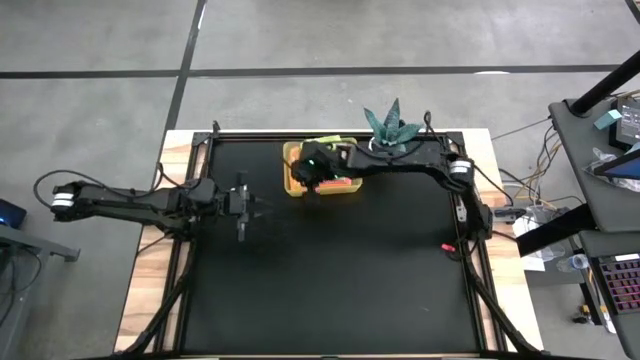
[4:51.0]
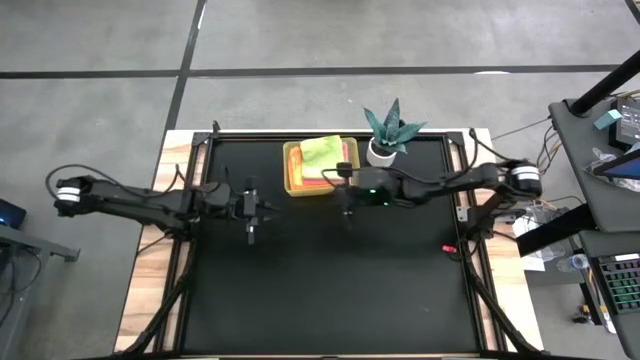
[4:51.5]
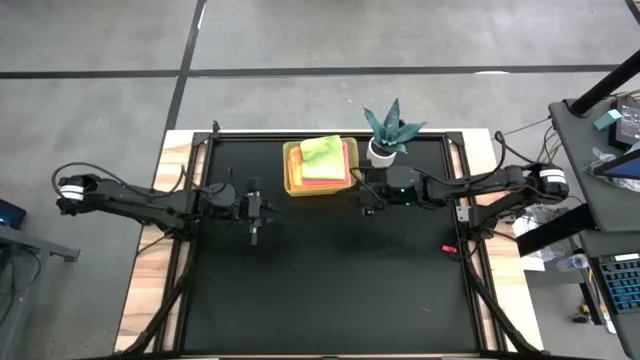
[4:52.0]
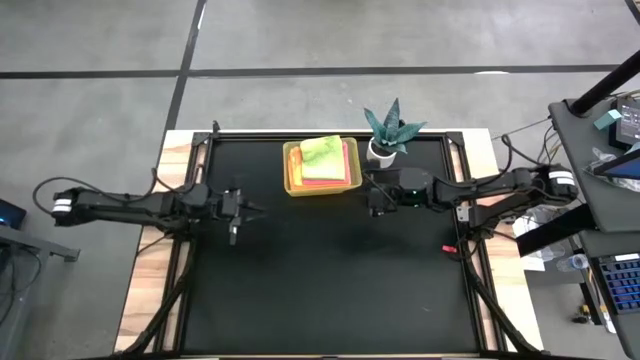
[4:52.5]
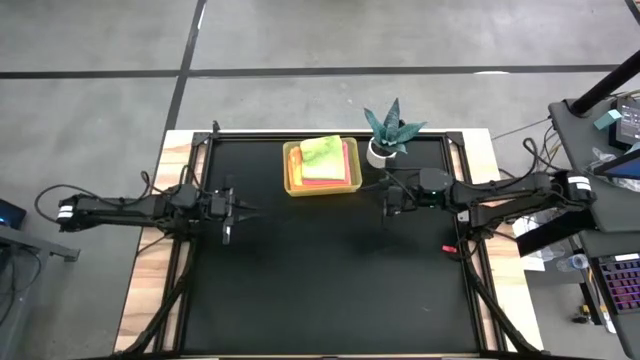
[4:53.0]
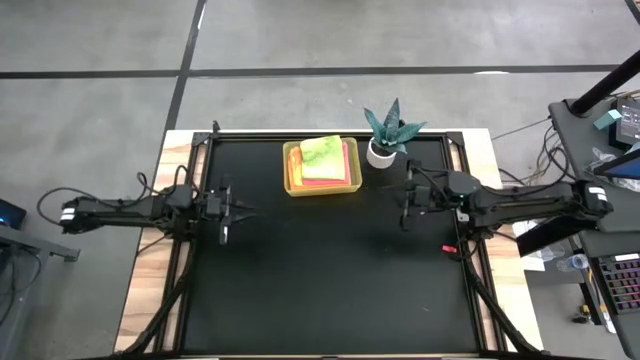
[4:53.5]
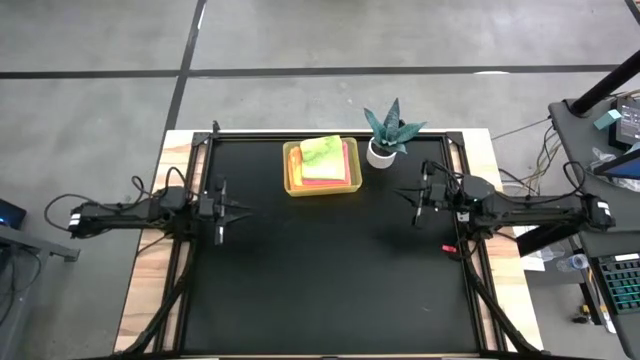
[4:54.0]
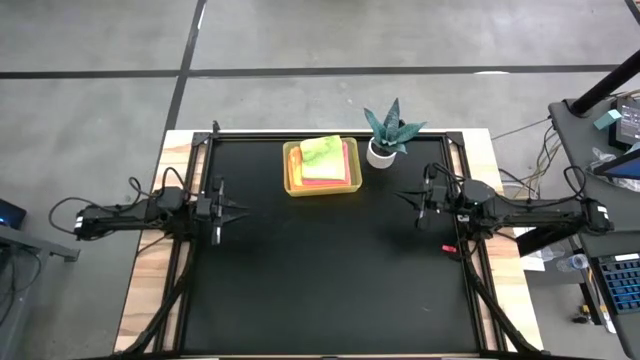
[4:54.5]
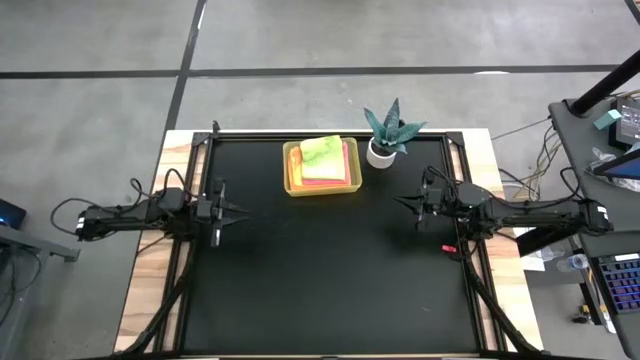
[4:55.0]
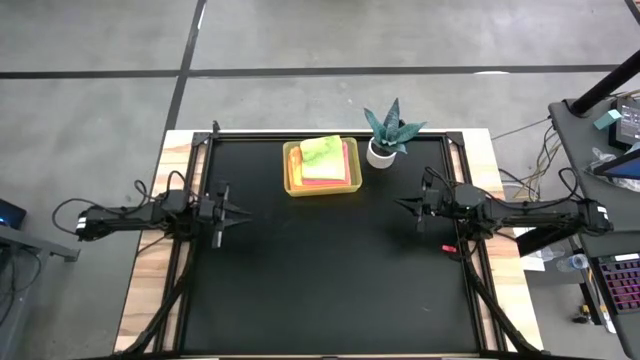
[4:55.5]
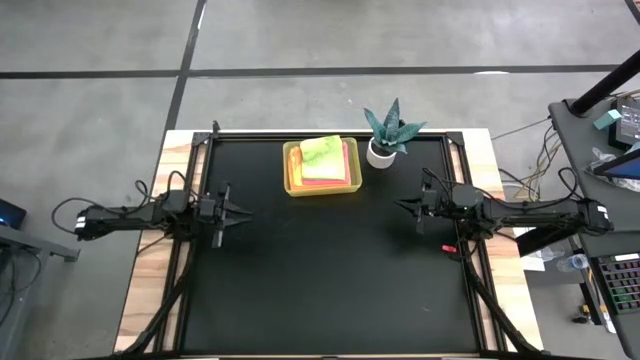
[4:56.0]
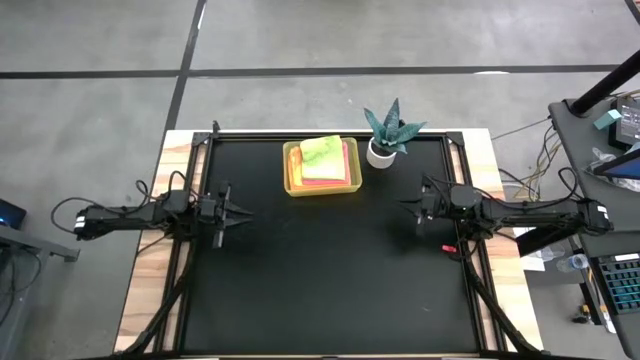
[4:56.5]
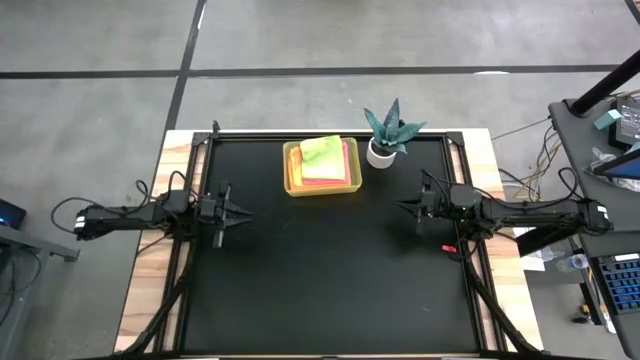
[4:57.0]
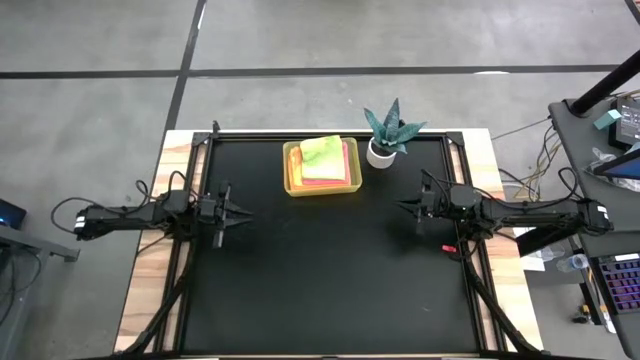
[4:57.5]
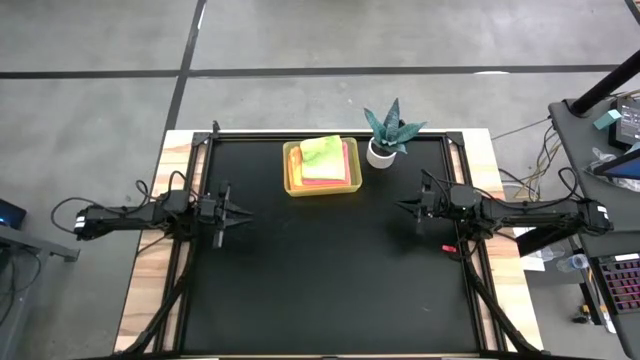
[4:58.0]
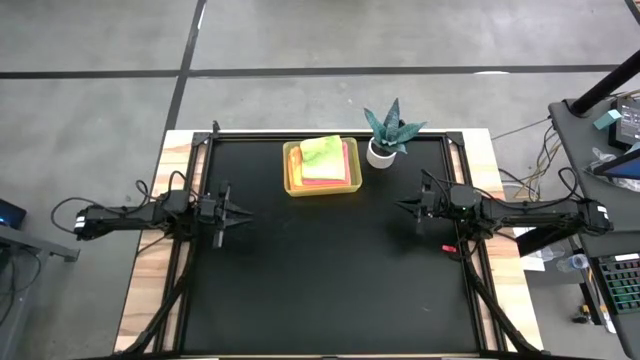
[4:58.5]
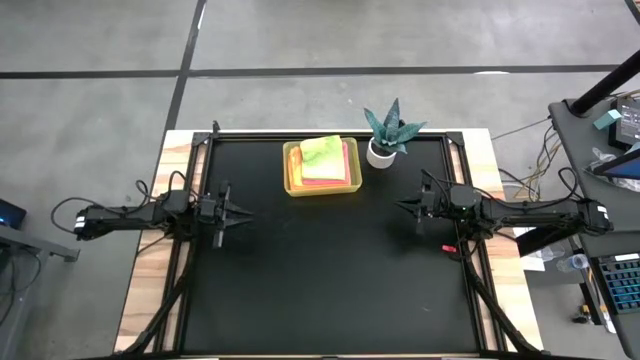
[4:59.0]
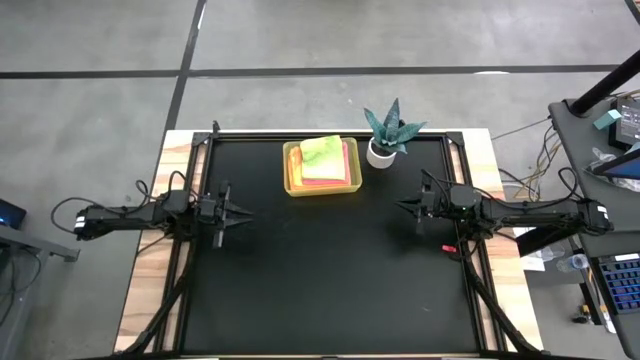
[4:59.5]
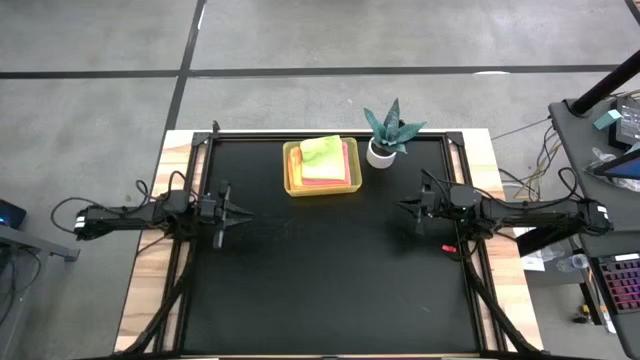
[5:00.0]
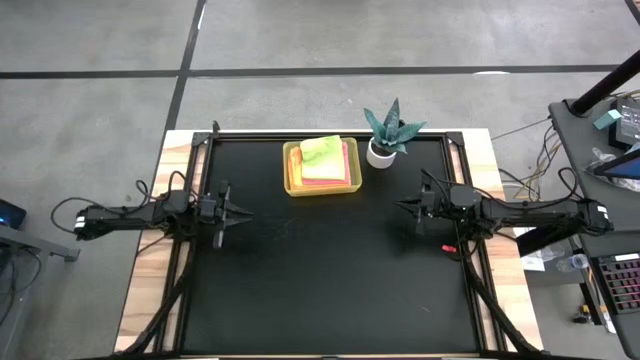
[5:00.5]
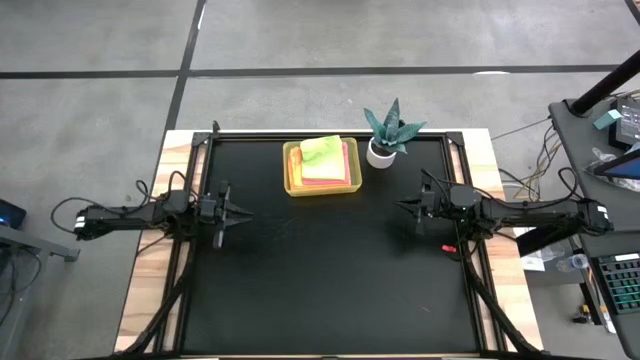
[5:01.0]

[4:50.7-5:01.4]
Task: Fold microfiber towels
Return to Home Position

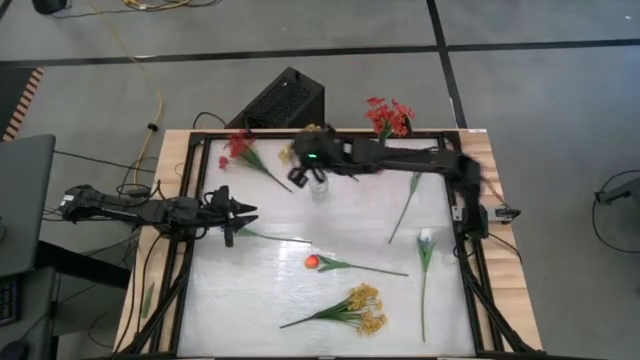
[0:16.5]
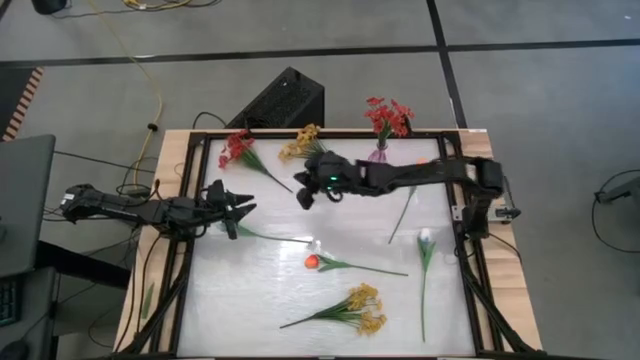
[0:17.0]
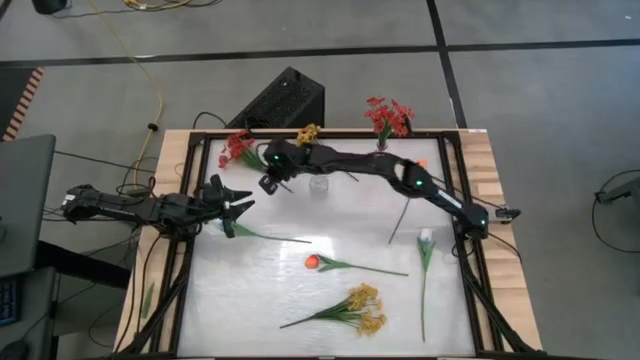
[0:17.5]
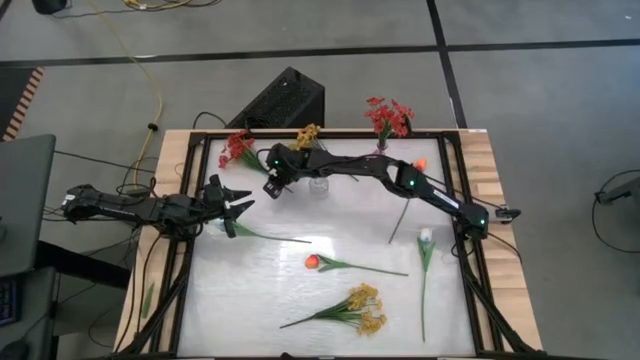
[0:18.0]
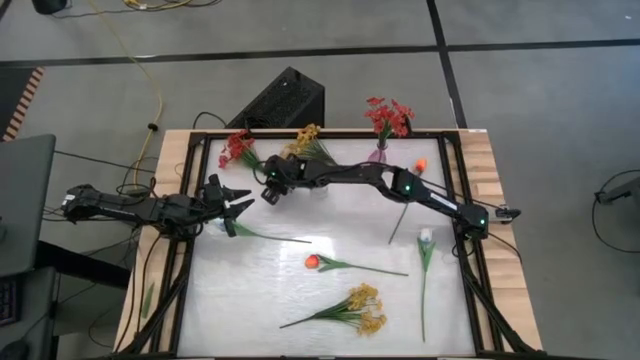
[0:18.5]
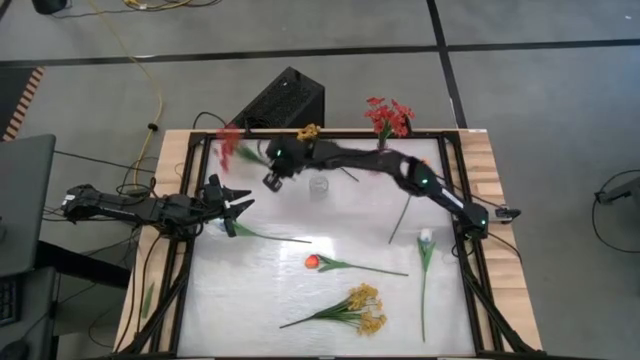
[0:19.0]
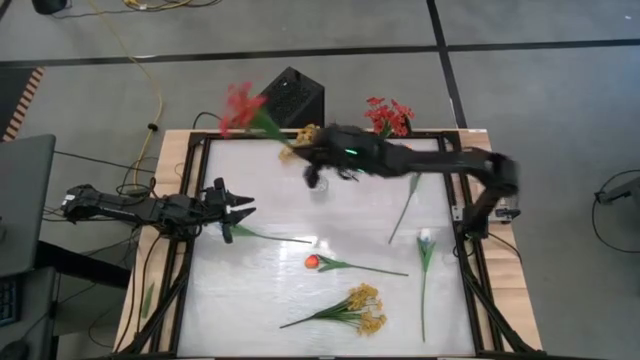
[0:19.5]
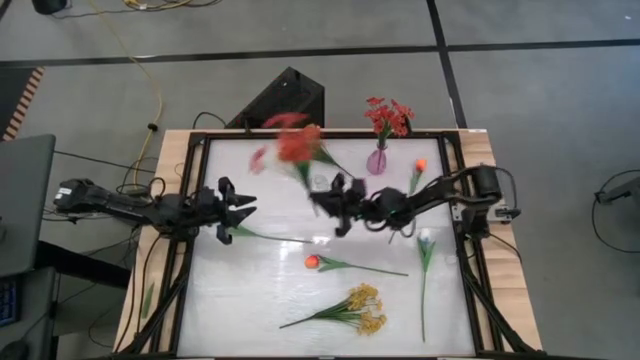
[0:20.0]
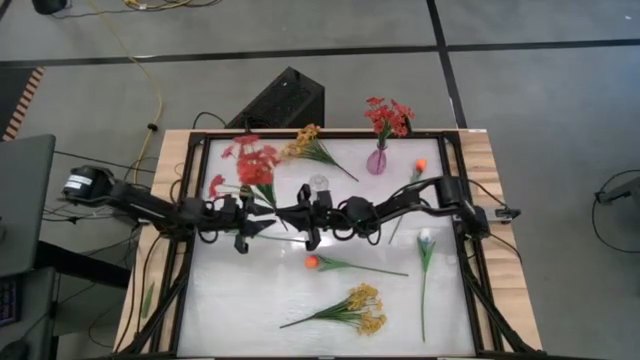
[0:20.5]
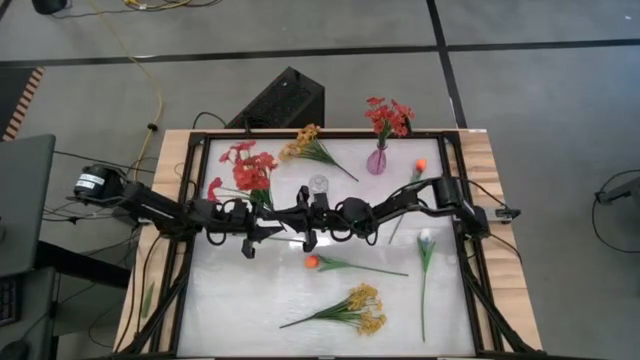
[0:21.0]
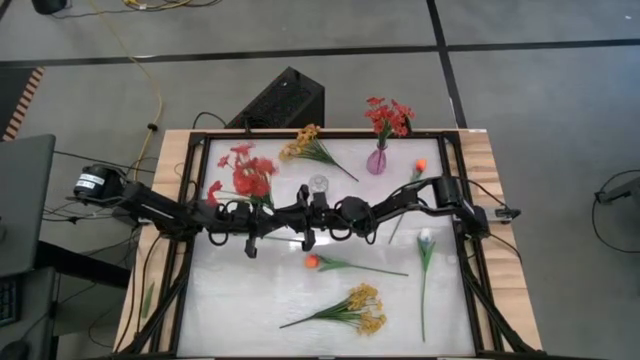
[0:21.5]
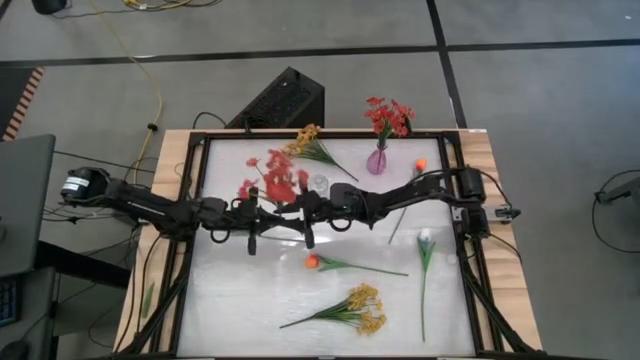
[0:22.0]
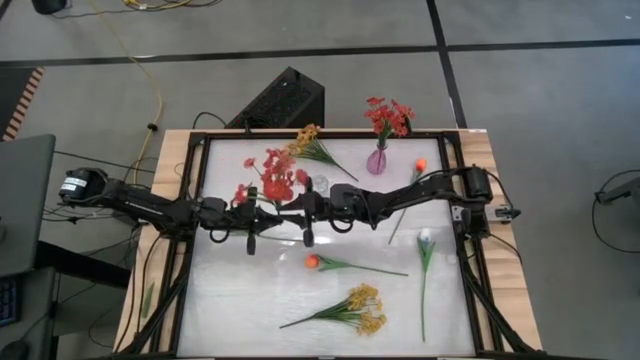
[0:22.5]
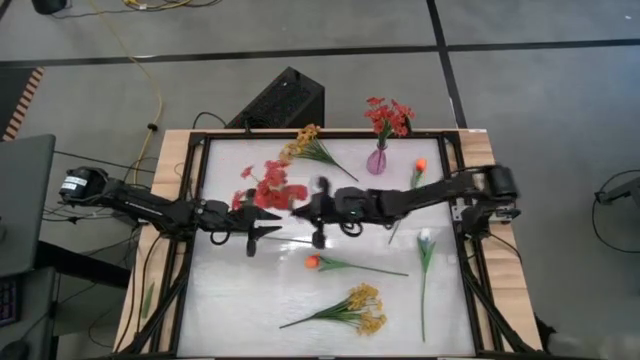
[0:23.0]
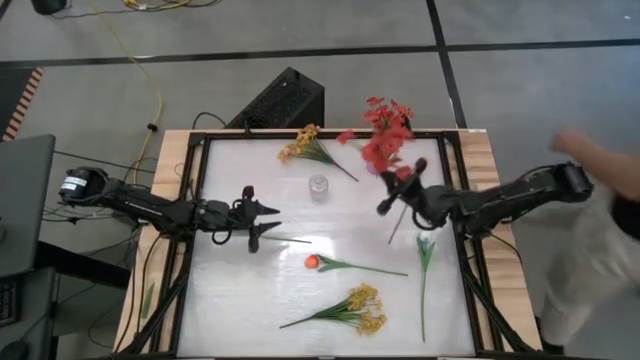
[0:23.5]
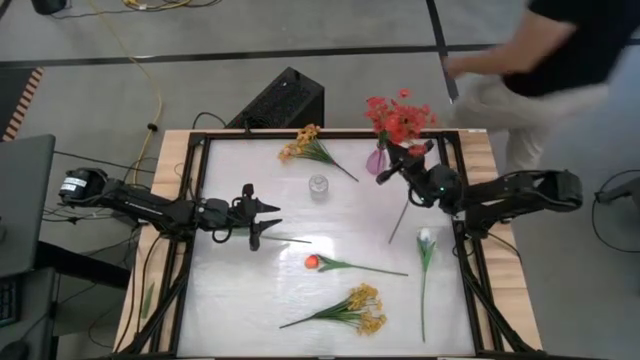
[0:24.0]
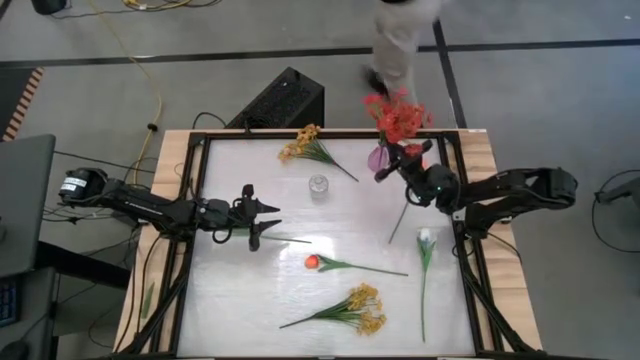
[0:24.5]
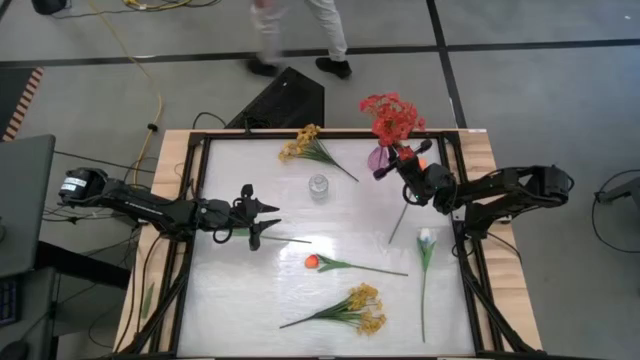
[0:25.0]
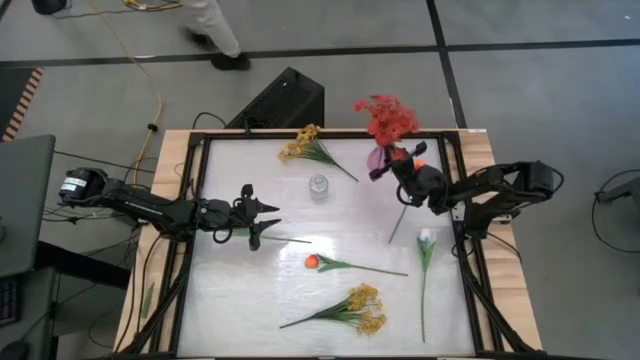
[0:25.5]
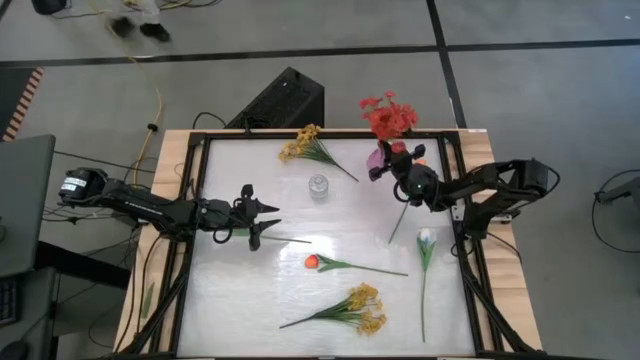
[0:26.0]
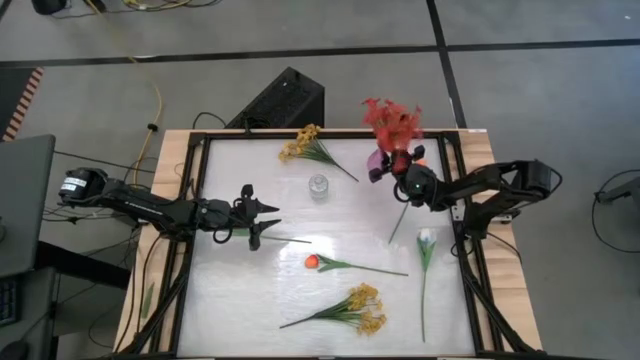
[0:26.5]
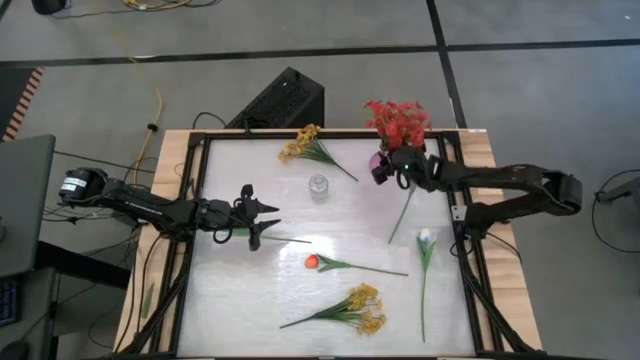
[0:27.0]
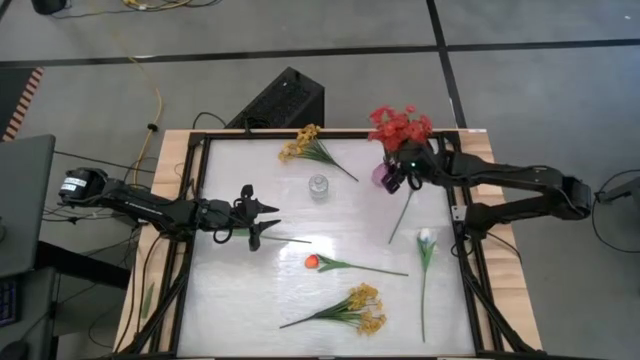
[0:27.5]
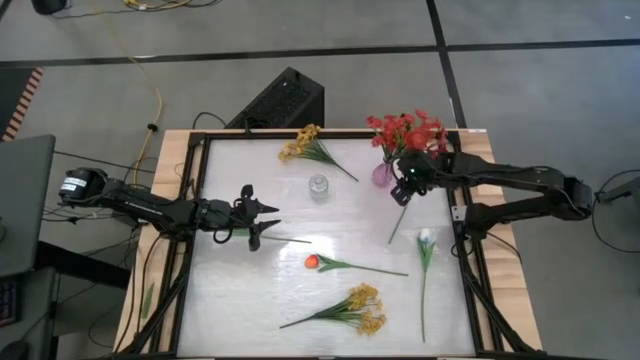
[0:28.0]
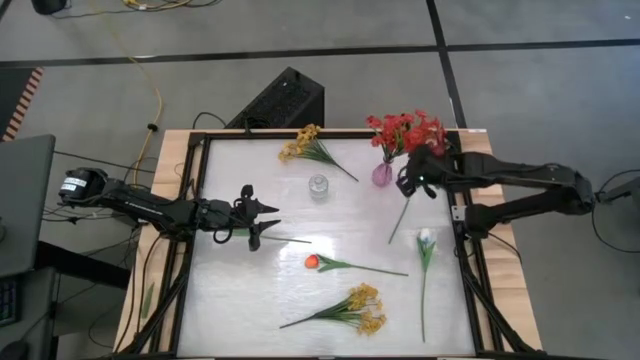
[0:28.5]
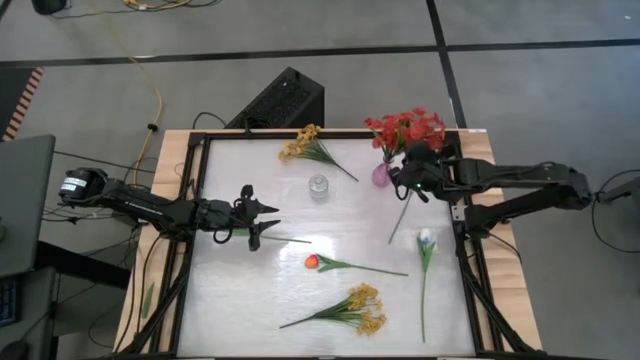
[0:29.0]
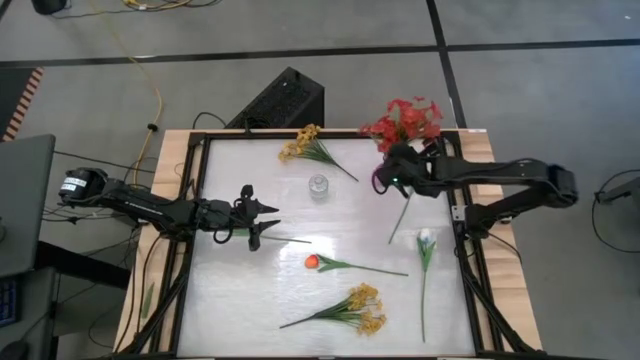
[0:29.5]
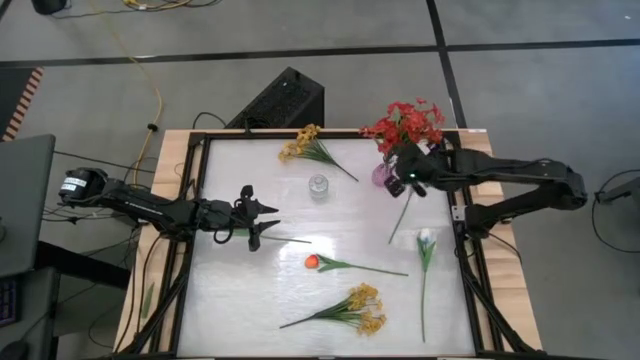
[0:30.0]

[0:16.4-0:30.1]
Task: Sort flowers into vase by color
Put the red flower into the pink flower vase
